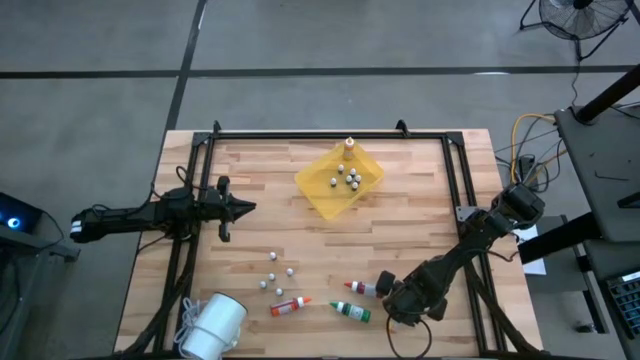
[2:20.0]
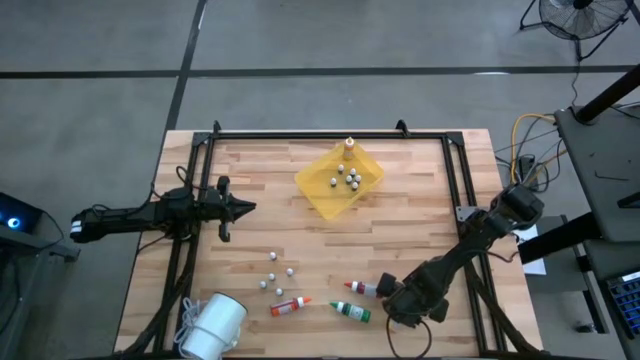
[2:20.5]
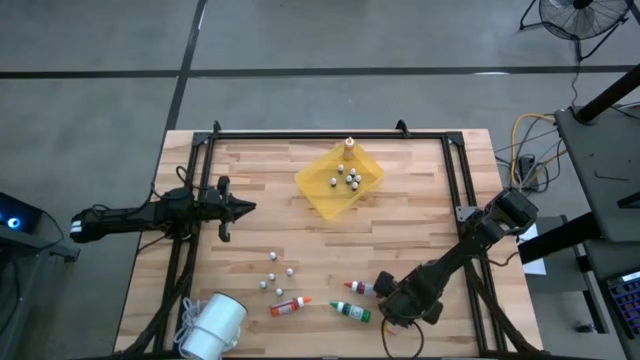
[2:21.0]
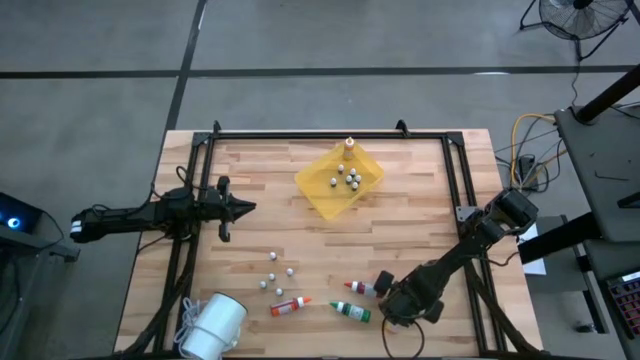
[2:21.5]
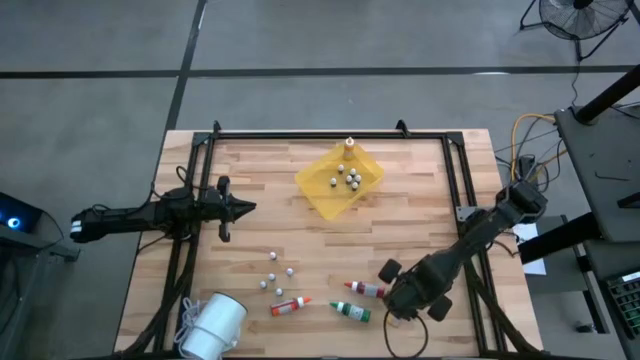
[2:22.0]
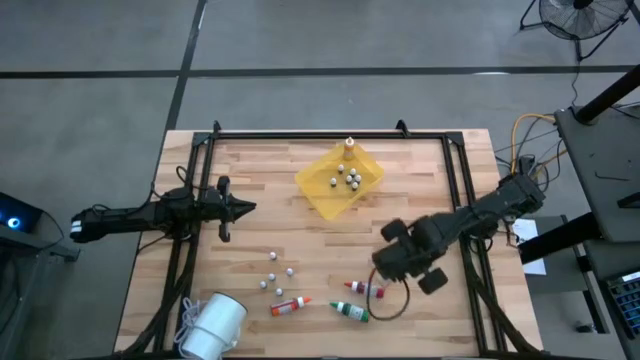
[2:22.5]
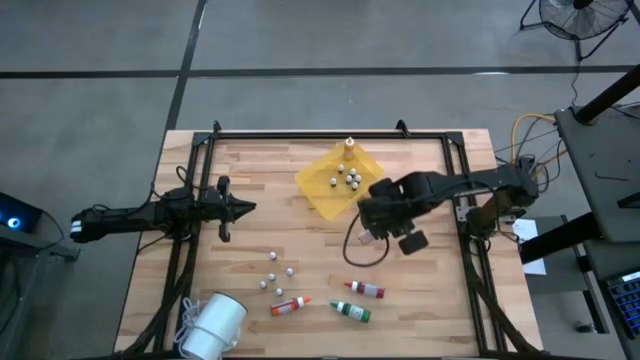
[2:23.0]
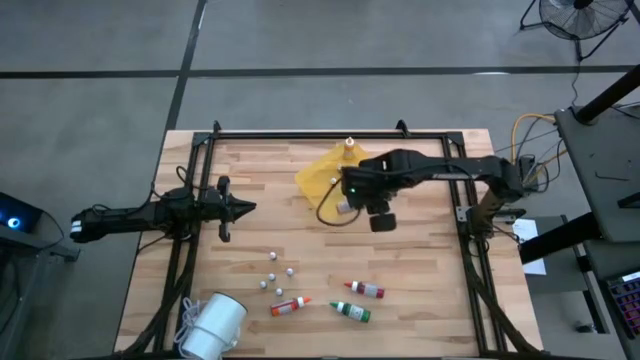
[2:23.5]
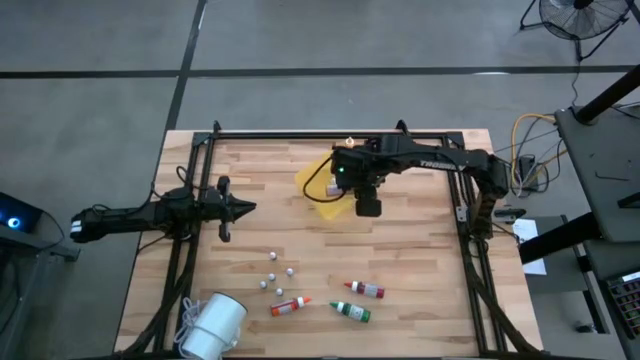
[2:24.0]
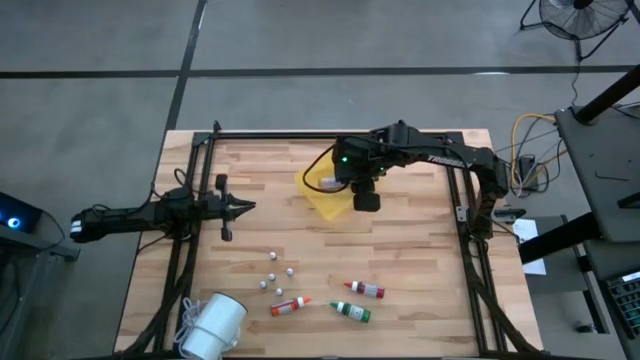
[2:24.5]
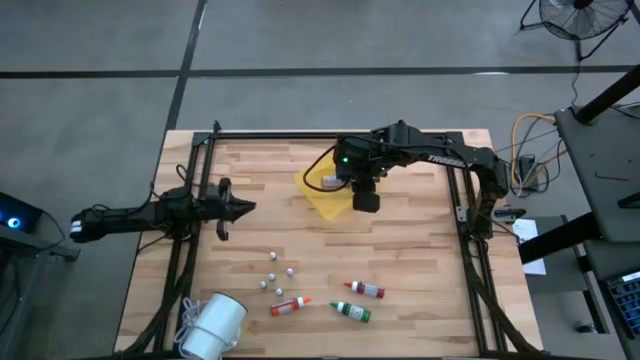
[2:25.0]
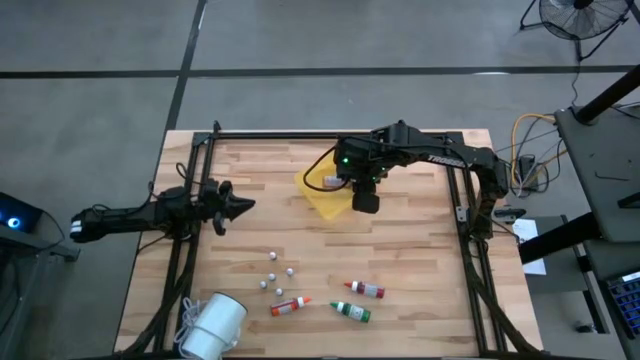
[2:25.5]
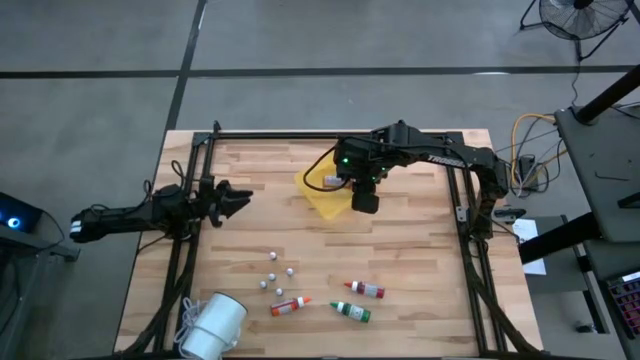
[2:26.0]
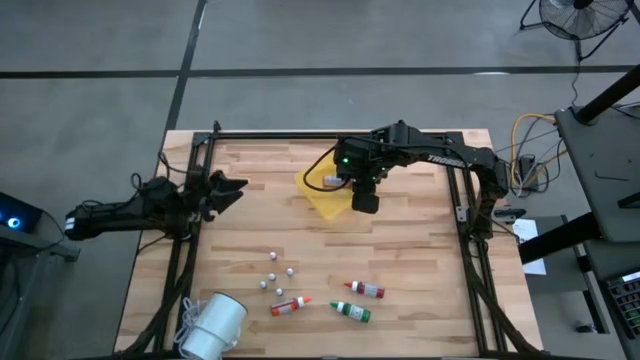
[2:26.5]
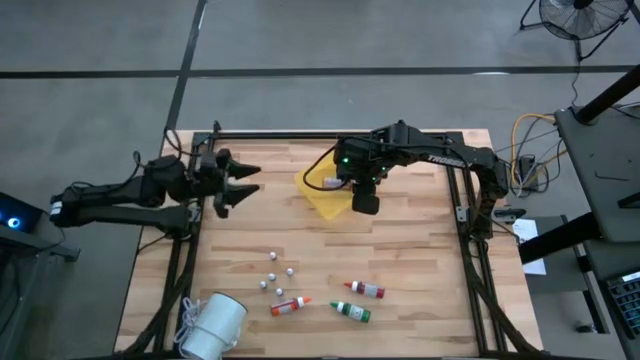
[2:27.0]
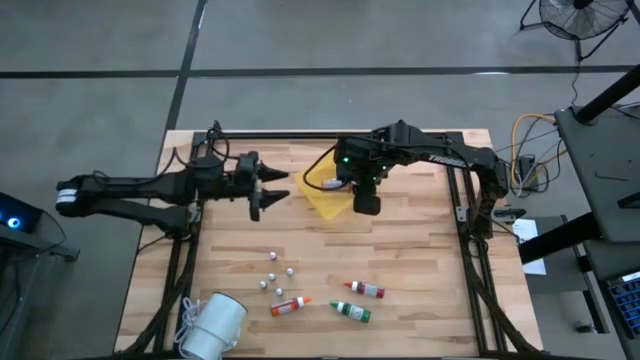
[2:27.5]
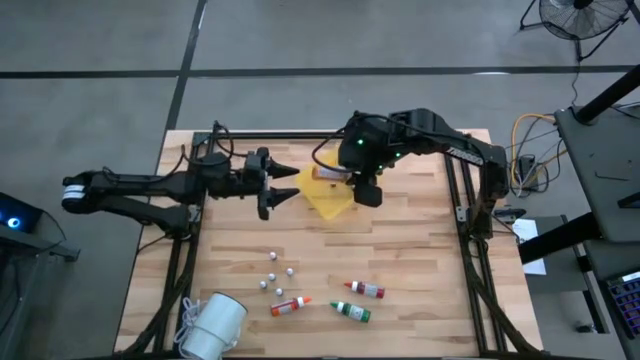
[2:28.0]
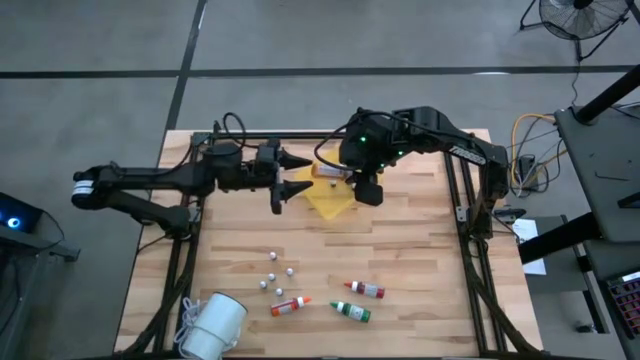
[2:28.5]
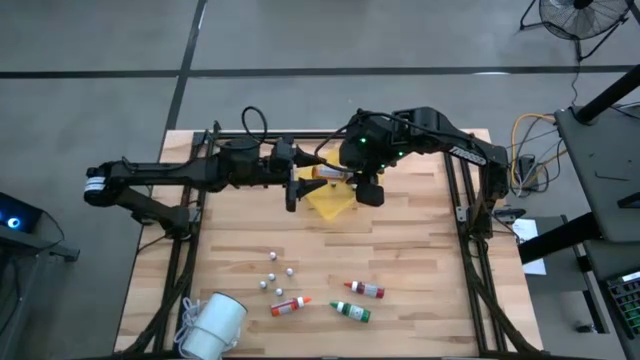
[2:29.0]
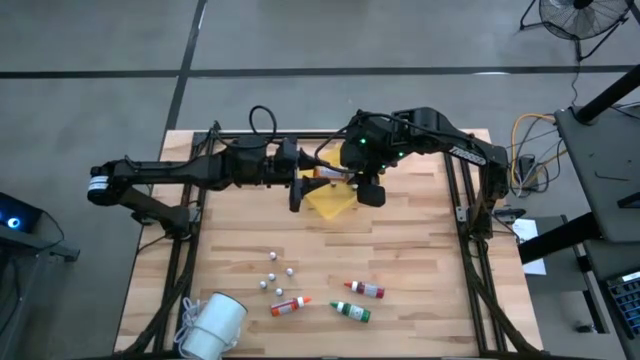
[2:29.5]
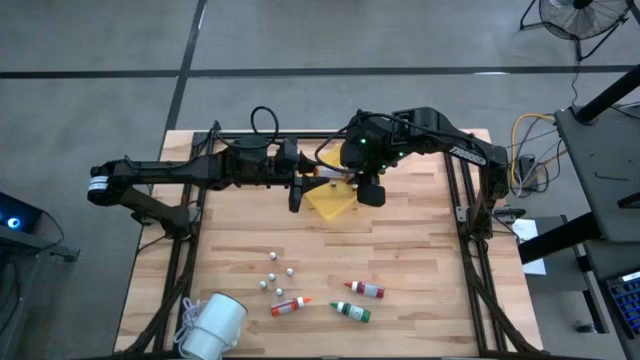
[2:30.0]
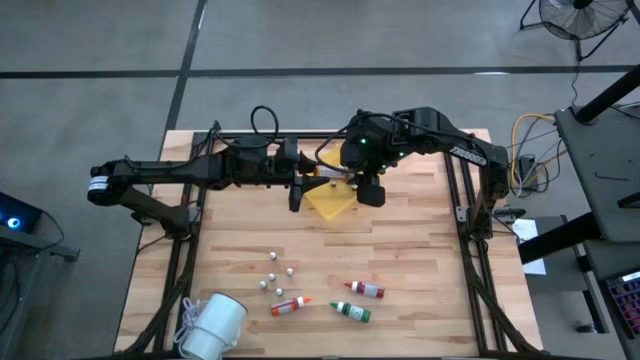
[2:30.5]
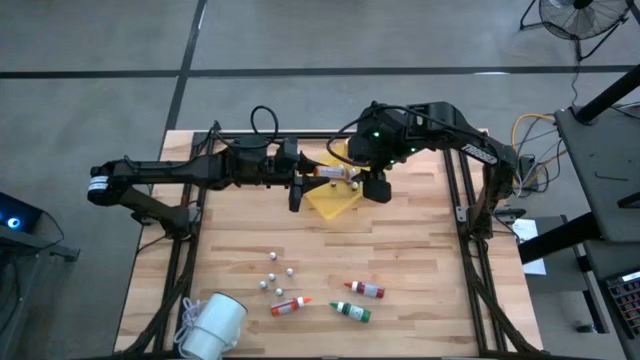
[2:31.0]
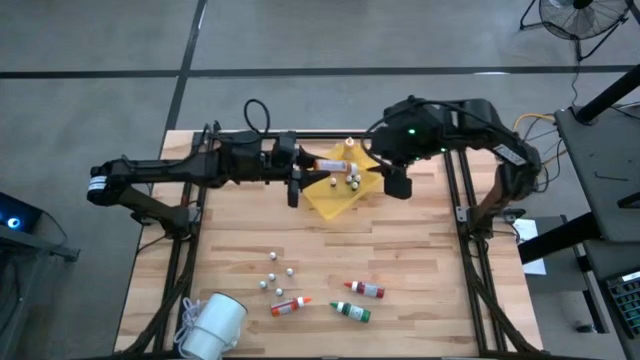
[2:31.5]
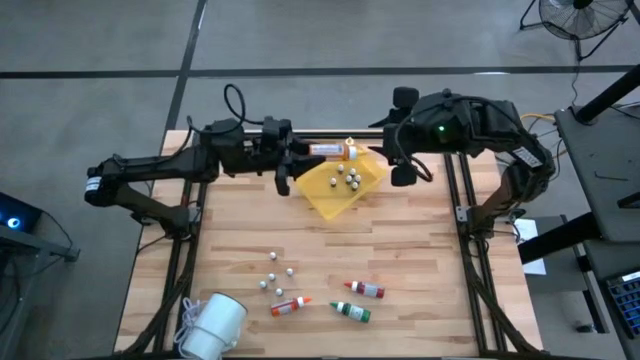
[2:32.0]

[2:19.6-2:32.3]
Task: Pick & Place food coloring
Put the large yellow food coloring bottle into the yellow bin
